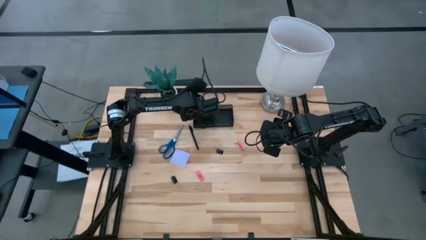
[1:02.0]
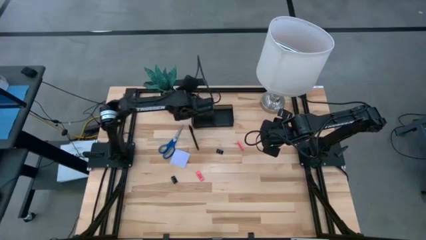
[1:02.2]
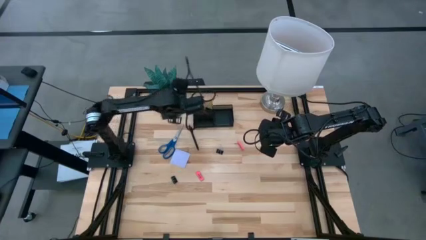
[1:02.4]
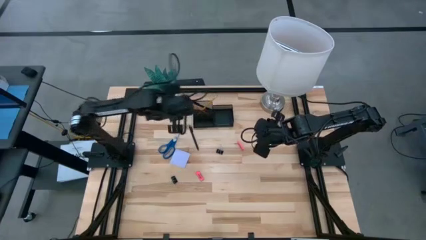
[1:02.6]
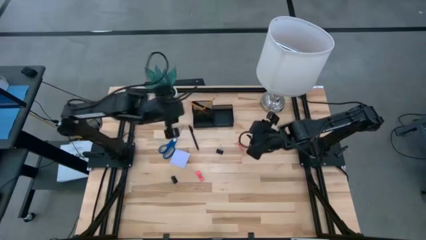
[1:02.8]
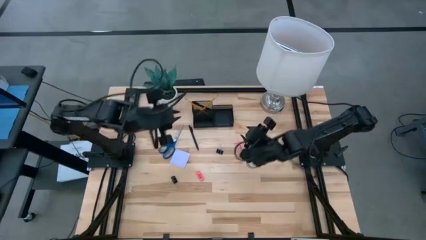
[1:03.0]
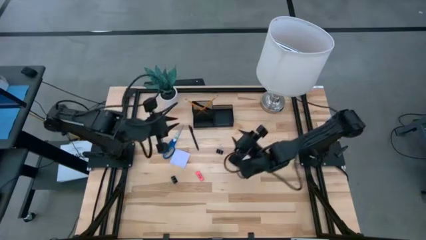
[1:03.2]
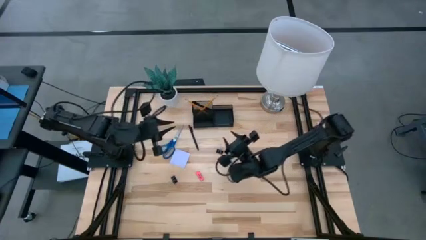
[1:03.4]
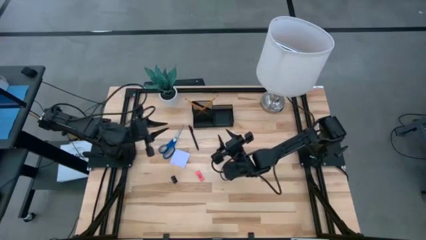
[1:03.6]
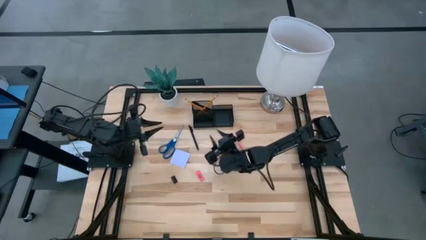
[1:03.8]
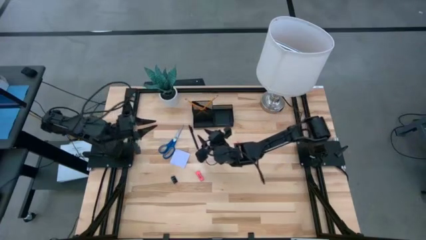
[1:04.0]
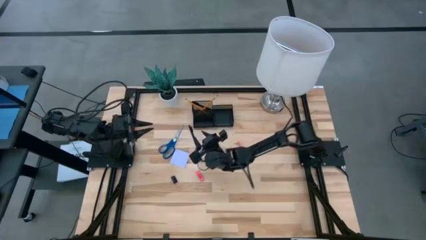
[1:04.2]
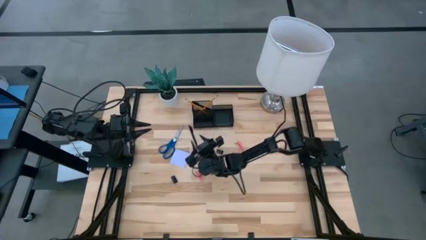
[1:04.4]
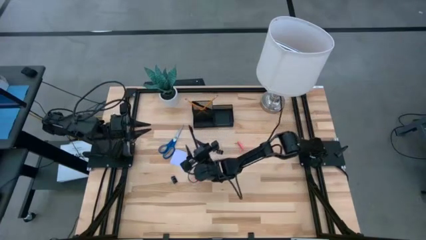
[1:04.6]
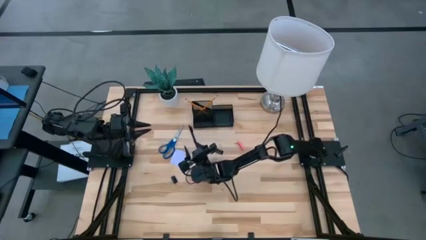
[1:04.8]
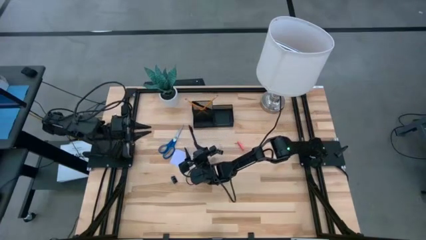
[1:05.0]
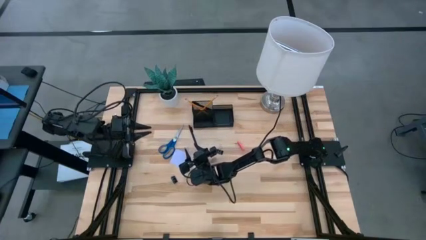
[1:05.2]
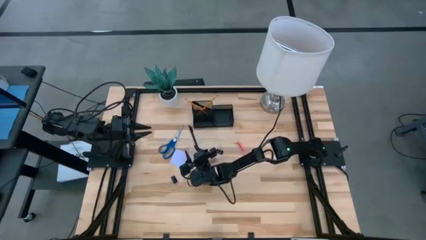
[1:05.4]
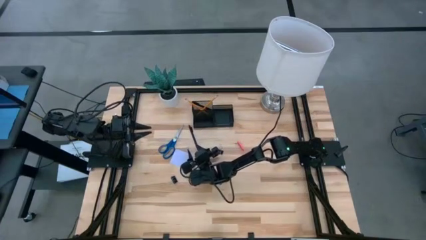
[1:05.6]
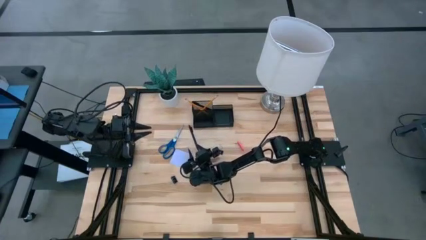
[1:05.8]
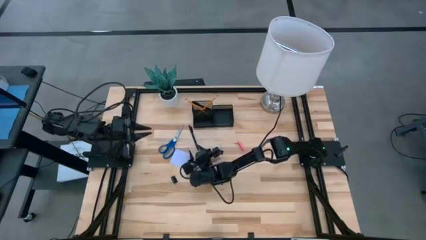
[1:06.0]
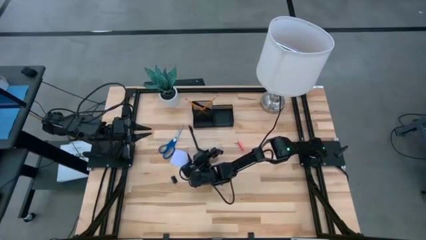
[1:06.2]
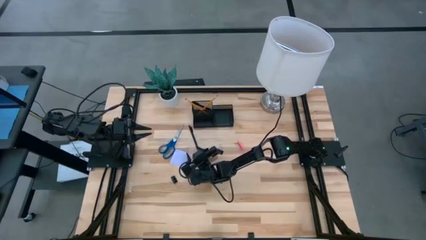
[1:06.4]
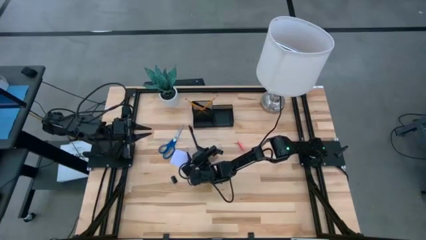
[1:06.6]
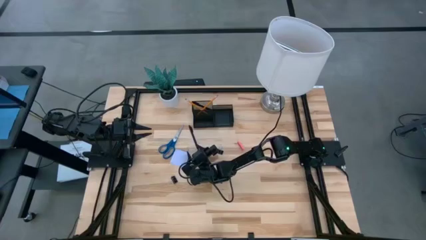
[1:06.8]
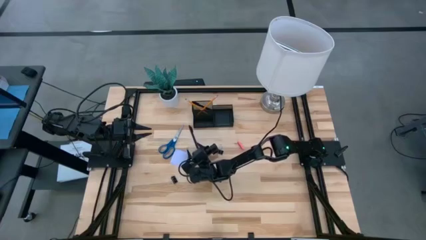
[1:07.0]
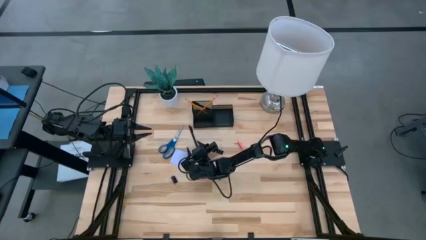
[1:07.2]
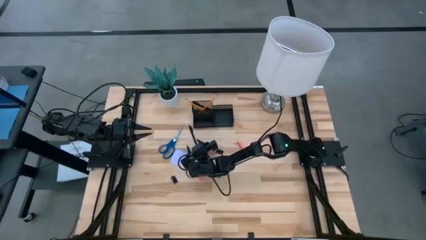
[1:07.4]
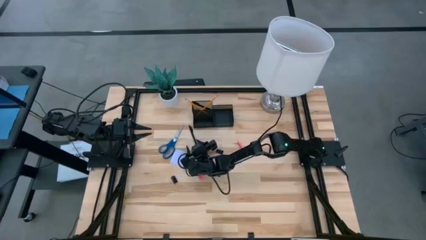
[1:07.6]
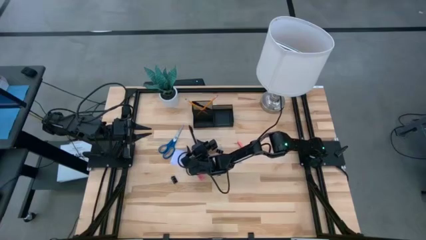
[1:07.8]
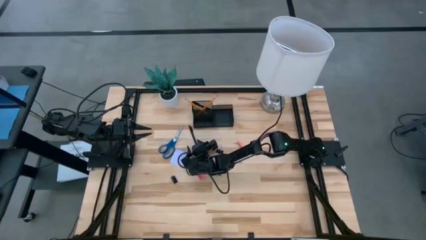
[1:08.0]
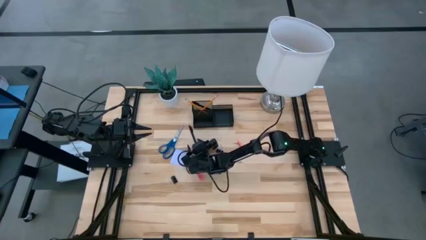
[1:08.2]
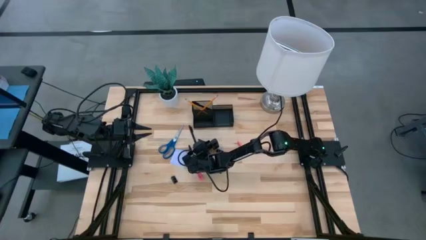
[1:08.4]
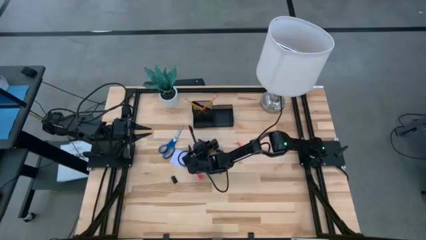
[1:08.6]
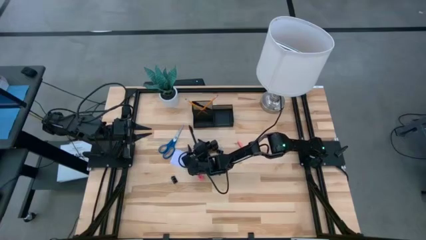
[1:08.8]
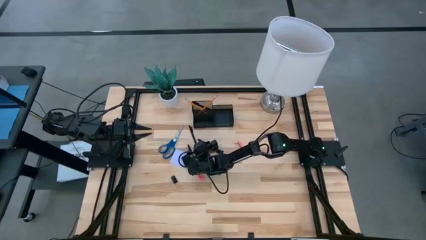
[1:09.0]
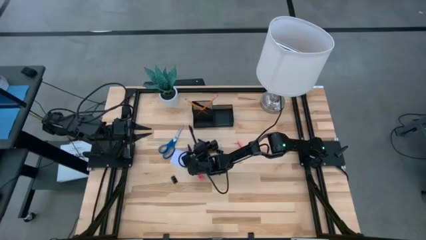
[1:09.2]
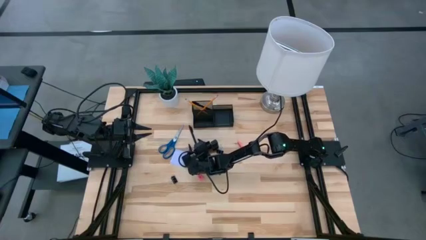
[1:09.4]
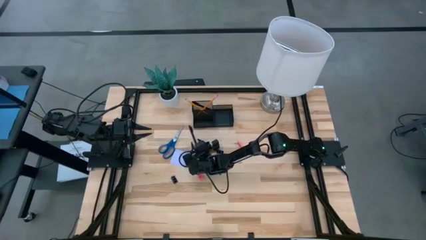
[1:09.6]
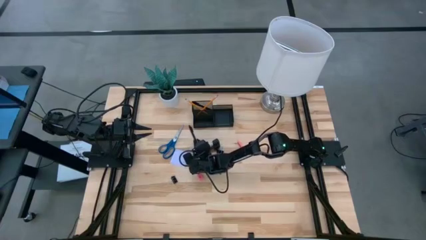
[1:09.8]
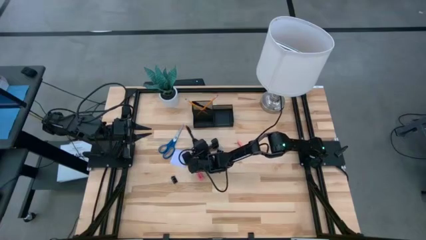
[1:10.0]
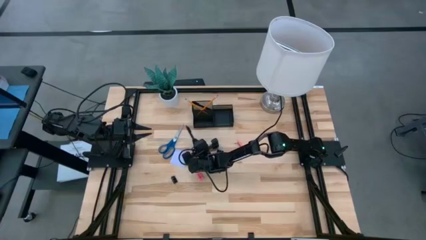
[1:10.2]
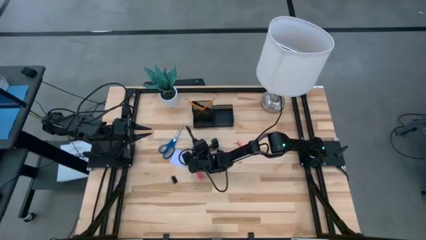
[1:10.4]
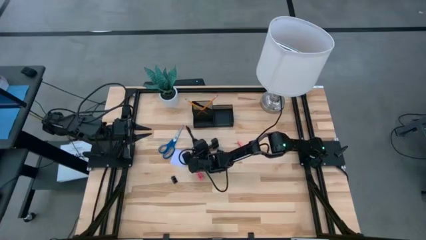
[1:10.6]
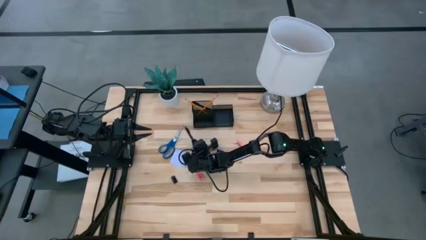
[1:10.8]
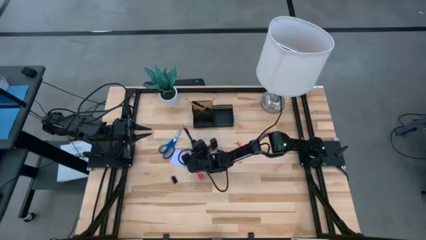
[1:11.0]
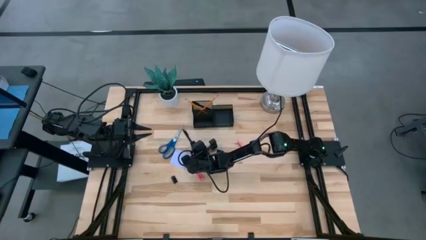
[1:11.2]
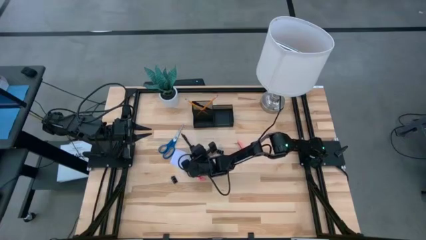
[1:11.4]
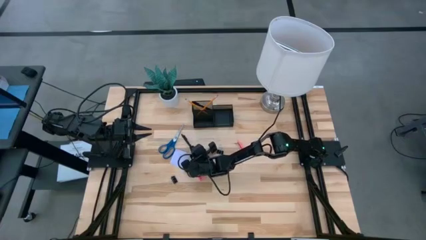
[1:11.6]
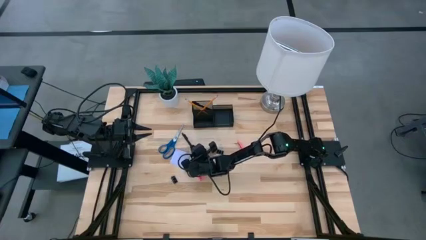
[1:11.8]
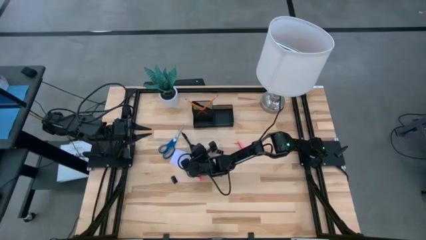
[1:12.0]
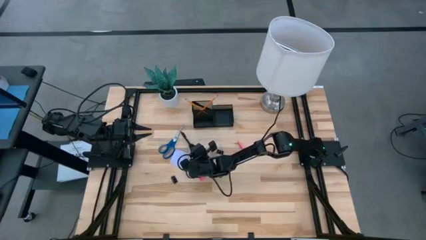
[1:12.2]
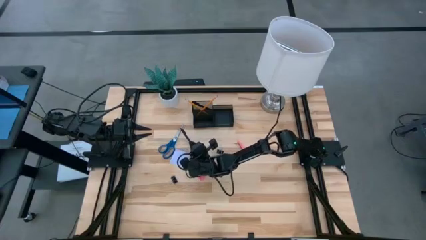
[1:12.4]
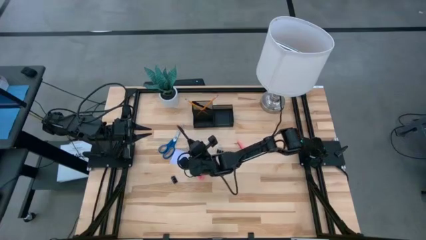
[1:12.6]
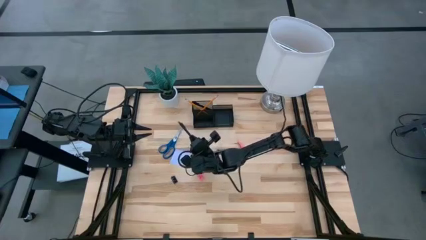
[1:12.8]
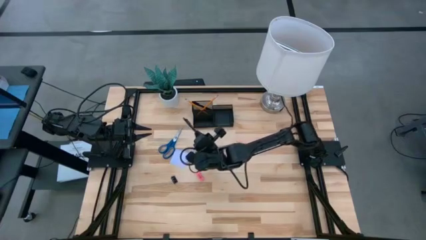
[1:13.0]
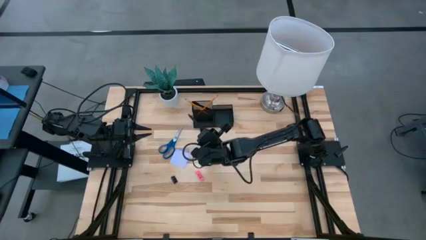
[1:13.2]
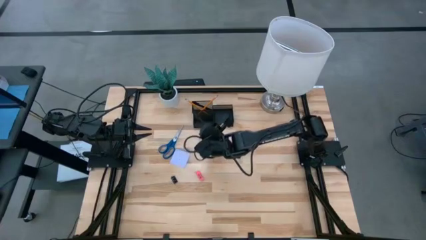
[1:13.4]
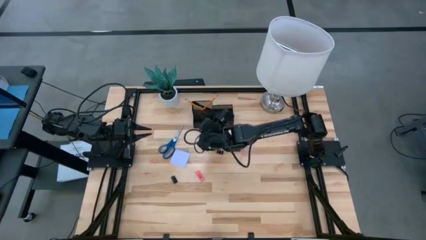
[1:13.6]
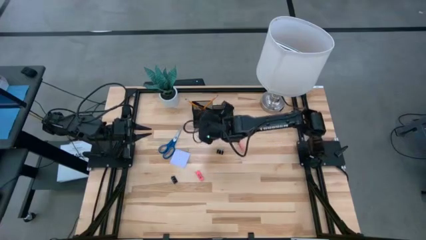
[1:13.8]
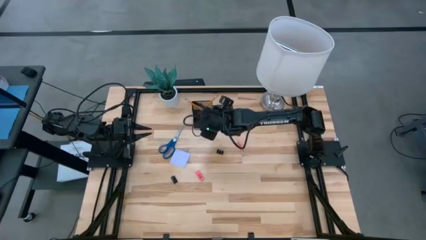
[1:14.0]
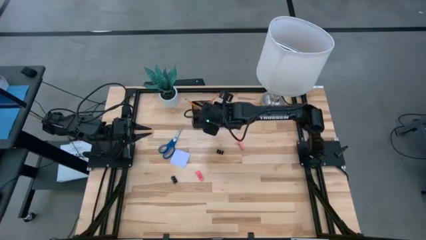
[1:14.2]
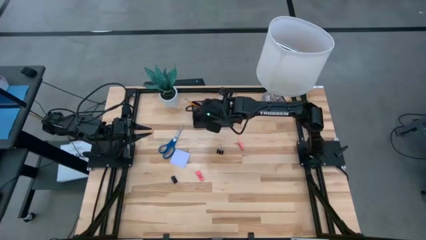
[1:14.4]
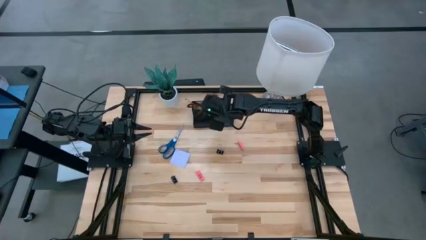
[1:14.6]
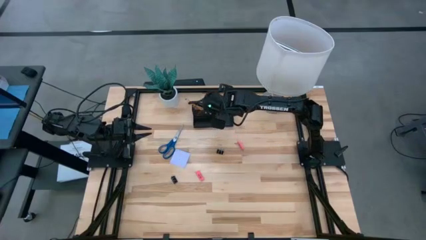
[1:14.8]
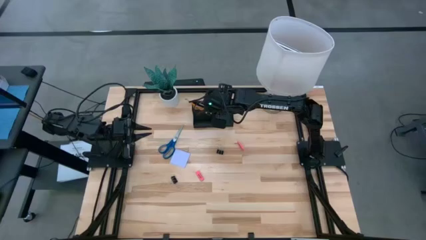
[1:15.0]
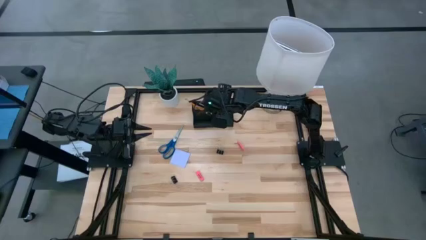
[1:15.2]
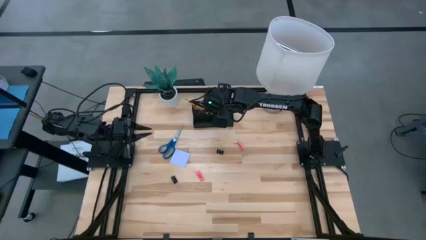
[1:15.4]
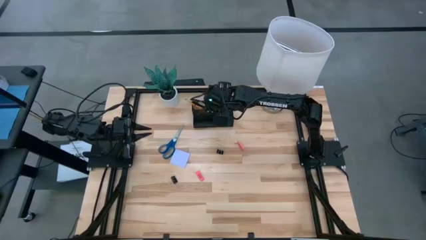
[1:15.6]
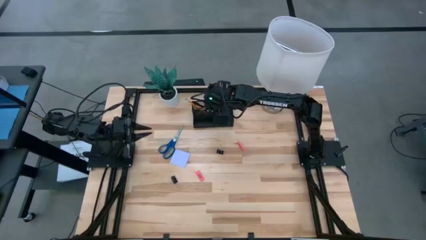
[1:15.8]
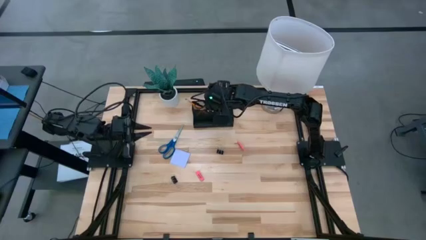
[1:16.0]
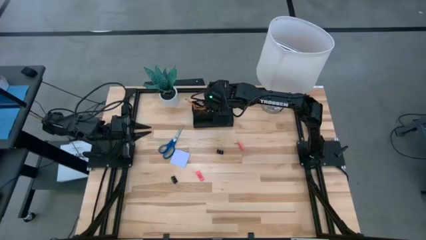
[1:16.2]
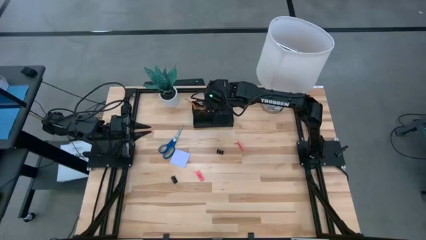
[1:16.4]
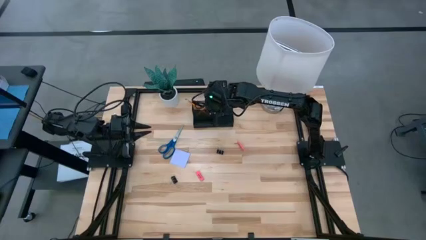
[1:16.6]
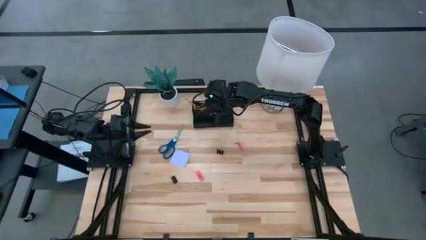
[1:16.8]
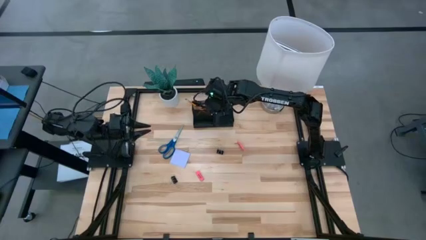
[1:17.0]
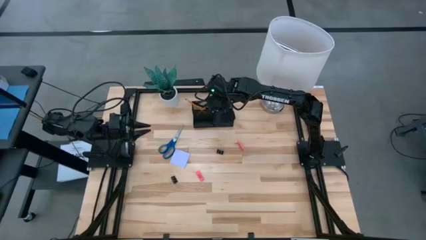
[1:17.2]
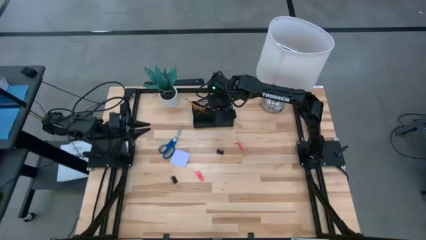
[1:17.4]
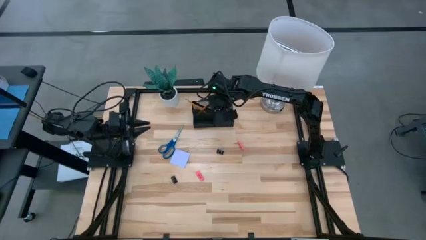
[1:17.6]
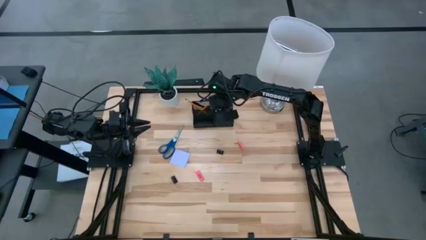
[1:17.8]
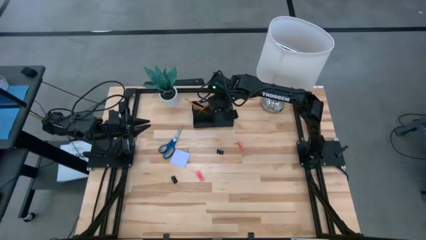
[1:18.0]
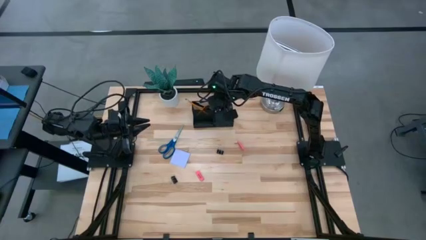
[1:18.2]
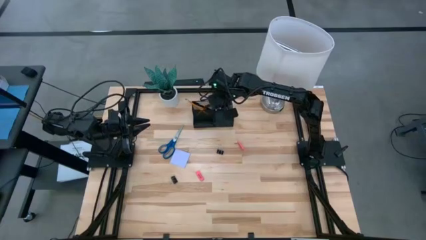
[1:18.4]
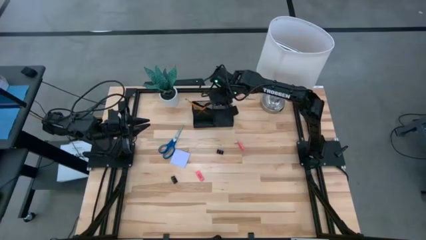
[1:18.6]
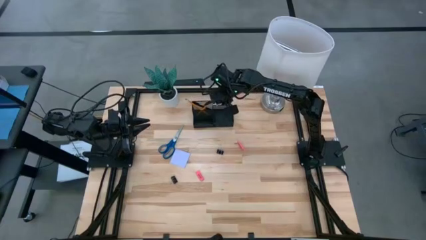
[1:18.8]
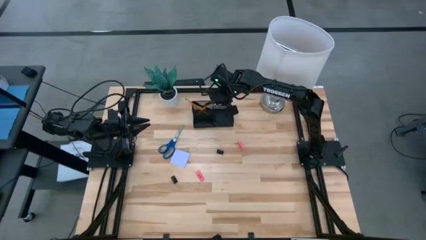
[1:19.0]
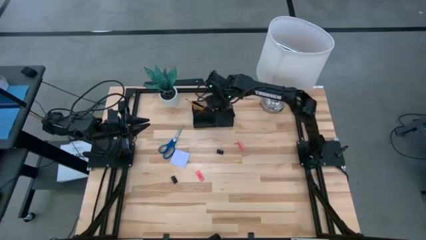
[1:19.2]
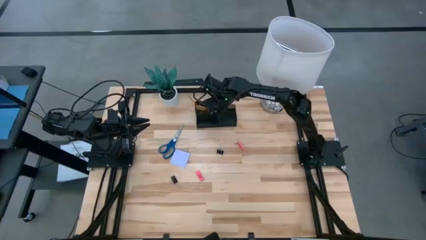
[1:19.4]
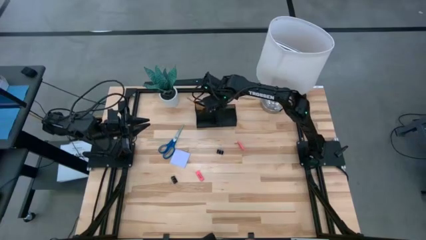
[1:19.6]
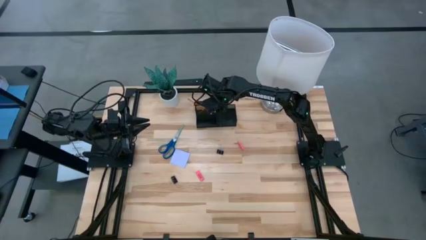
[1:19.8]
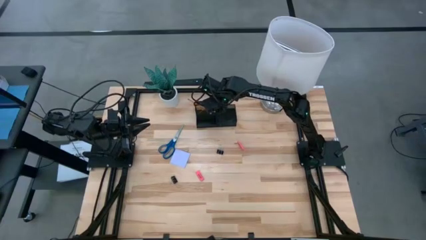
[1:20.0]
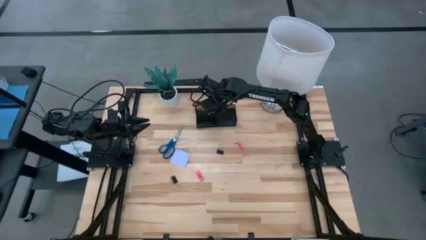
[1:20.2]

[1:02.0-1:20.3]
Task: Pick and place office supplies into organizer
Put the black ball pen into the desk organizer
